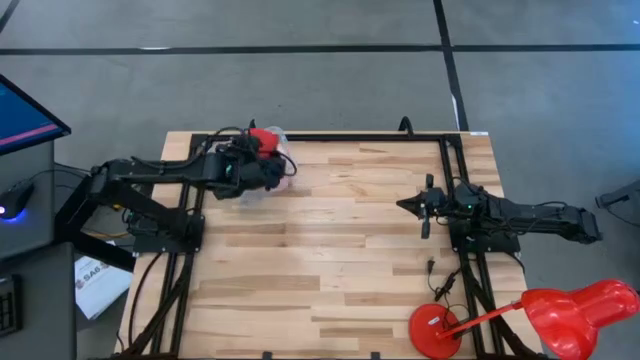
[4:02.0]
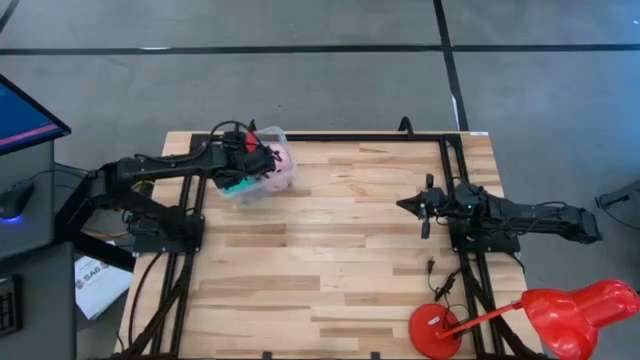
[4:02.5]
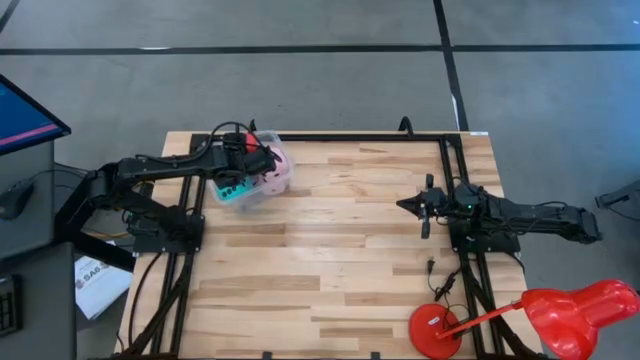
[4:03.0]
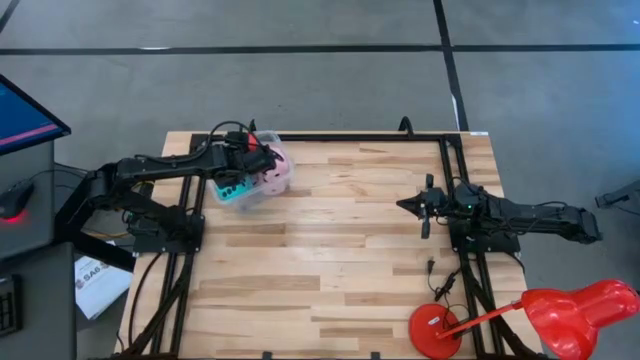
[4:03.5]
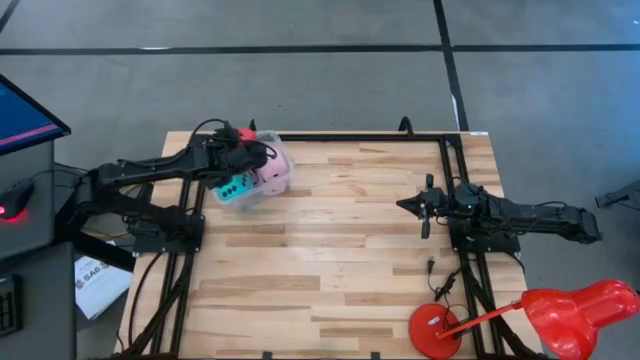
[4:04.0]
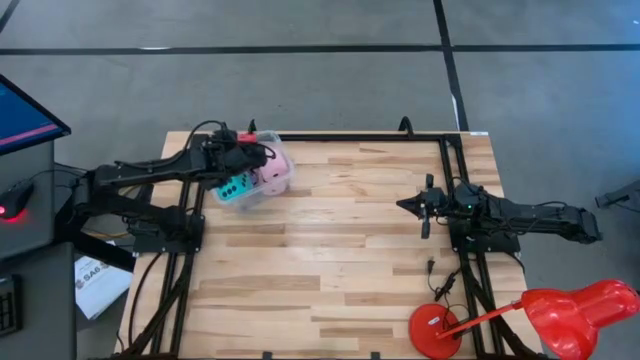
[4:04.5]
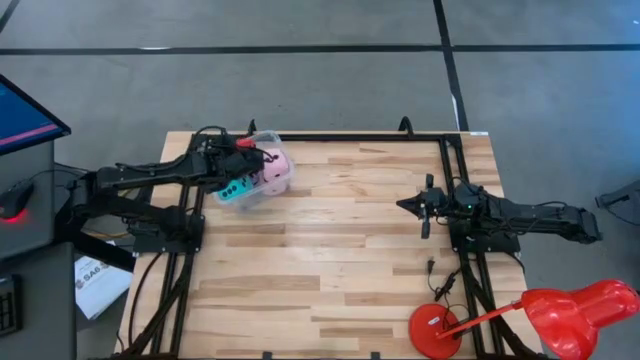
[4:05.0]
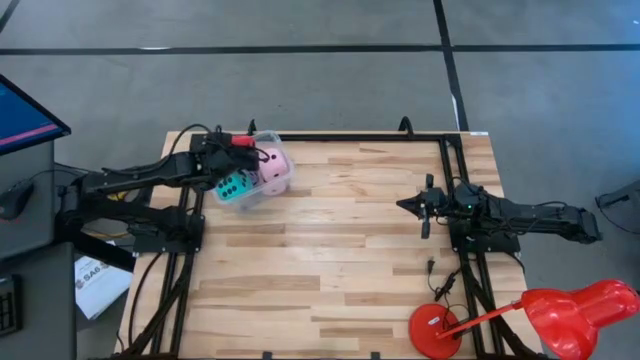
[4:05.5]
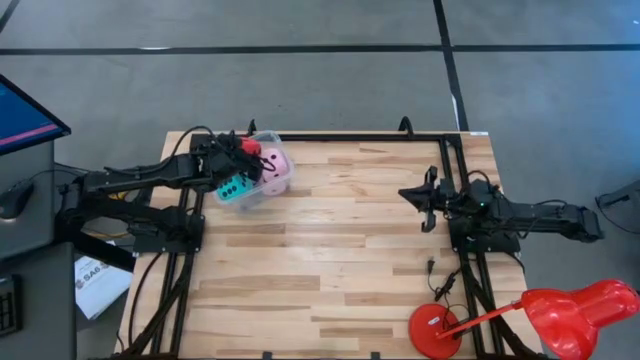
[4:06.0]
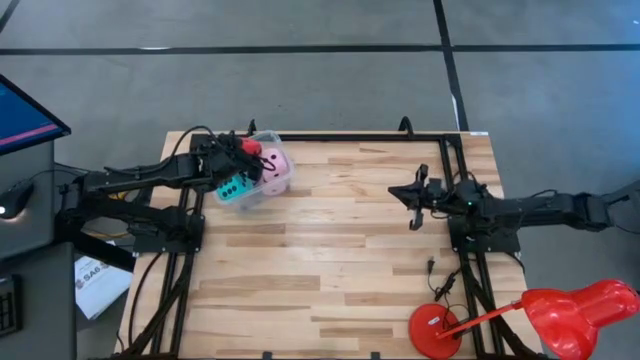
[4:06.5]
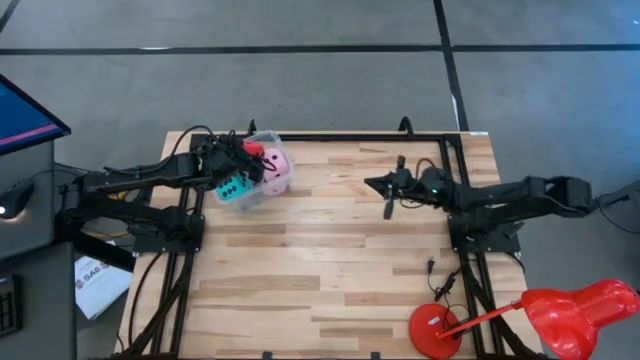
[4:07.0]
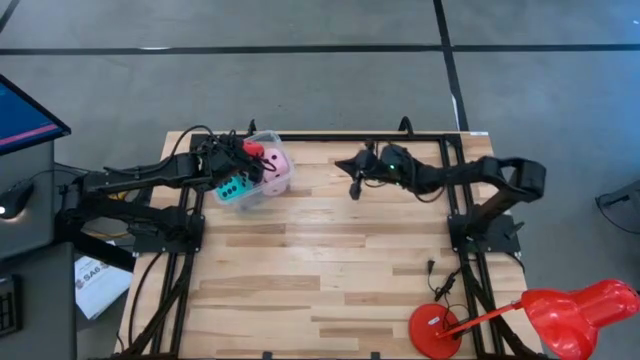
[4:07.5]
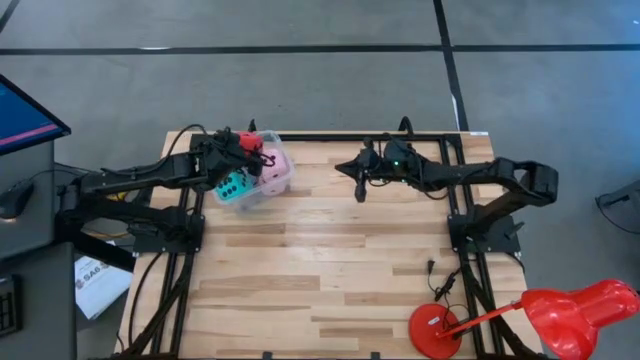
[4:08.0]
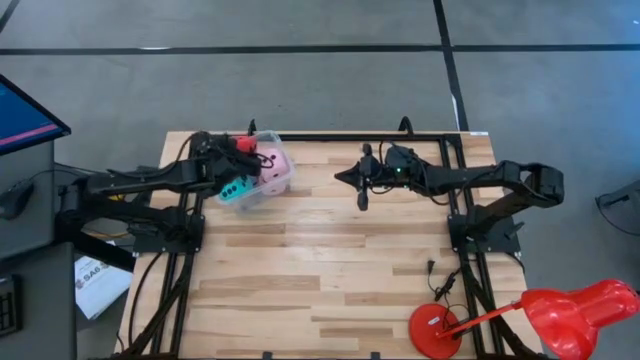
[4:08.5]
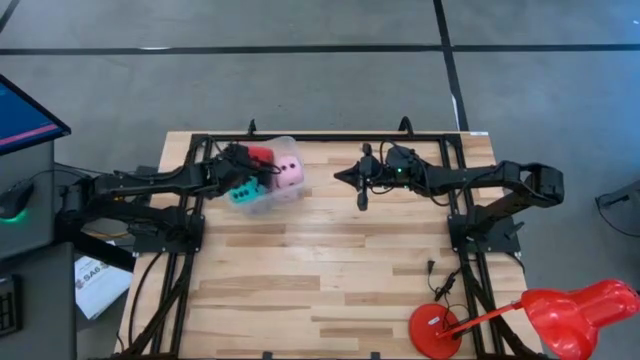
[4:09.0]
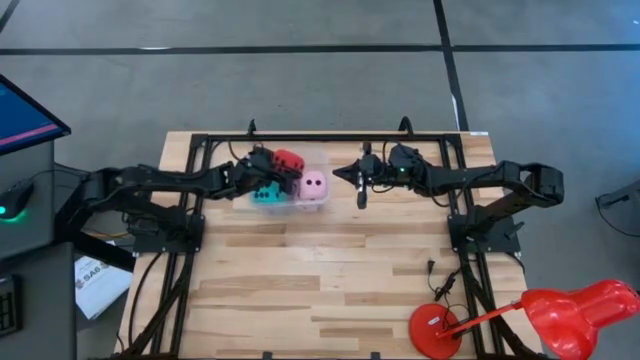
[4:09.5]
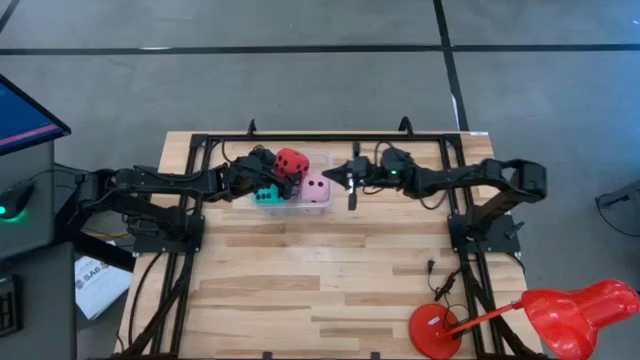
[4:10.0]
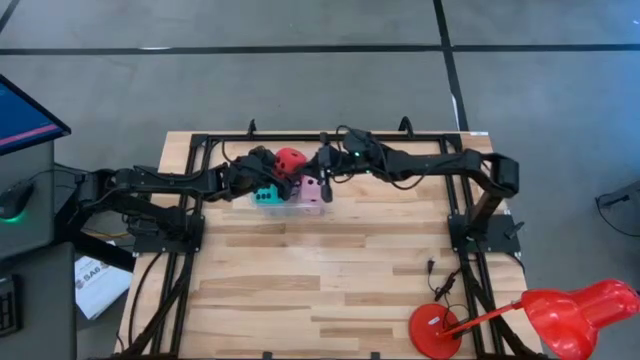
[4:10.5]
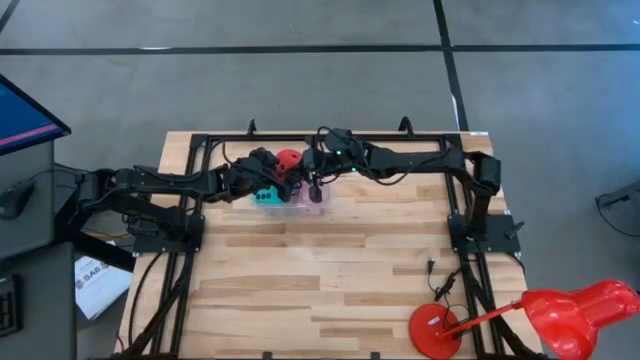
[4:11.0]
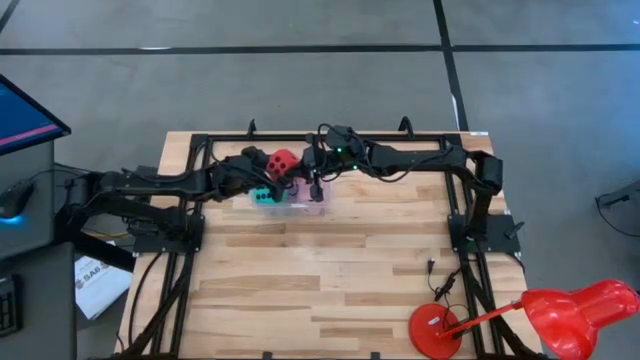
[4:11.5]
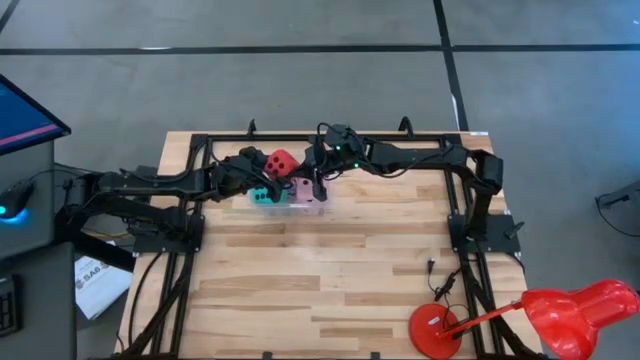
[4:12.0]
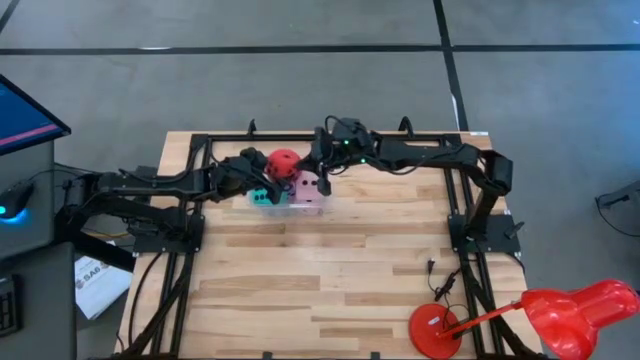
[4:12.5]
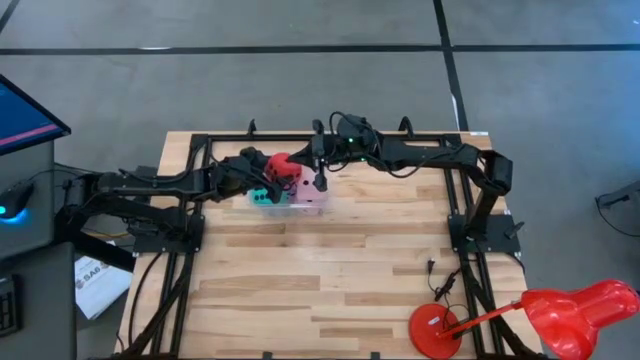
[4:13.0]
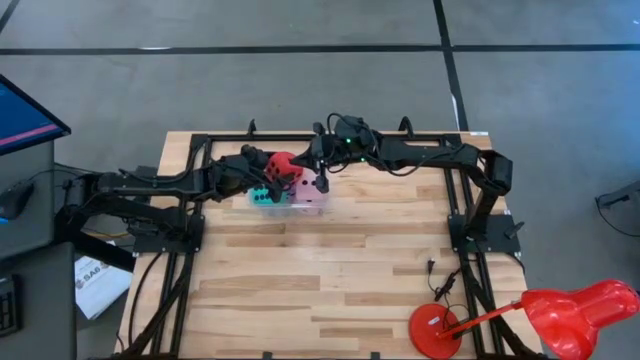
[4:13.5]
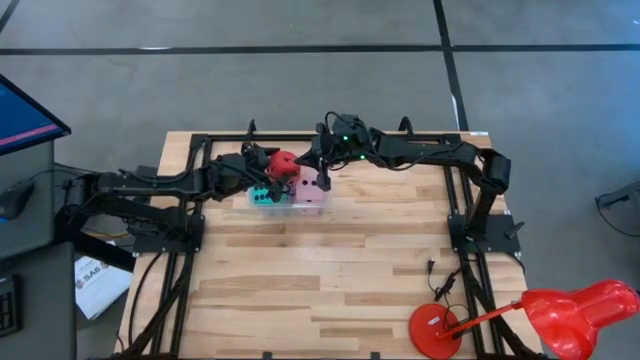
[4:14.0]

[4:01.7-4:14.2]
Task: Pick & Place Dice
Put the large red dice into the transparent container

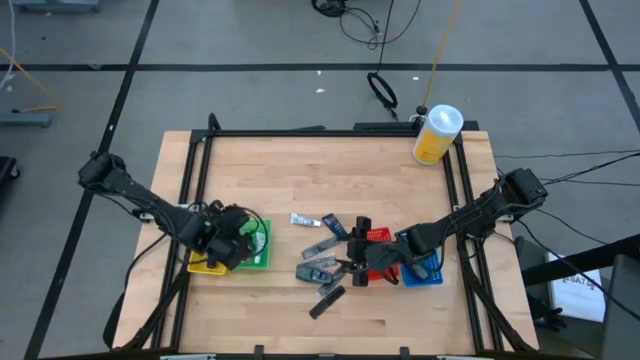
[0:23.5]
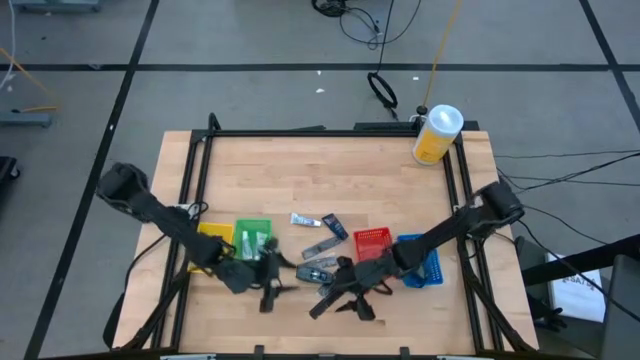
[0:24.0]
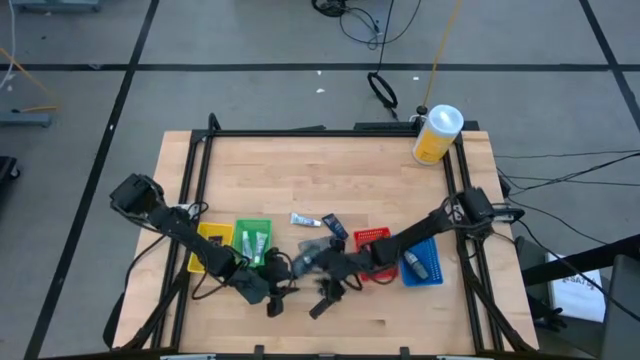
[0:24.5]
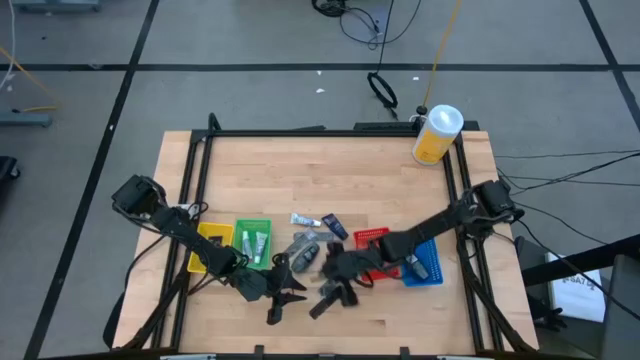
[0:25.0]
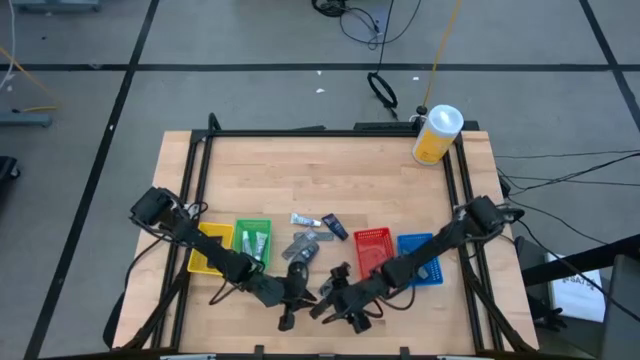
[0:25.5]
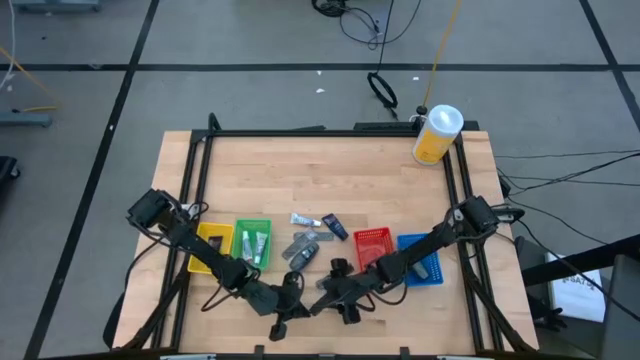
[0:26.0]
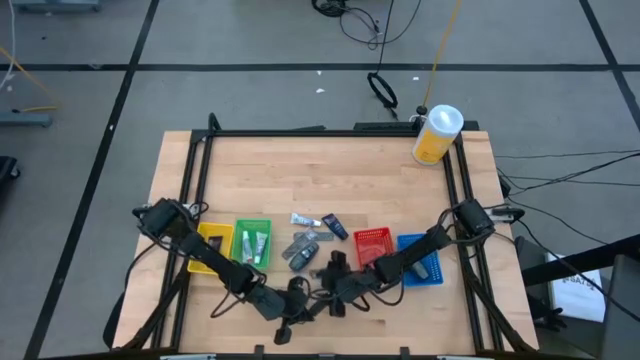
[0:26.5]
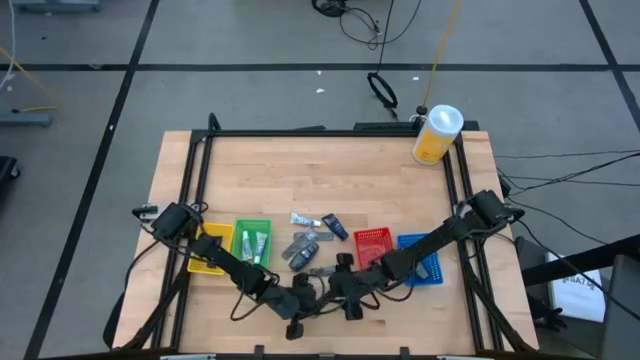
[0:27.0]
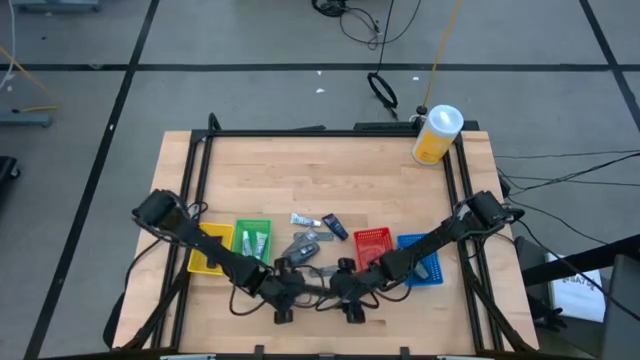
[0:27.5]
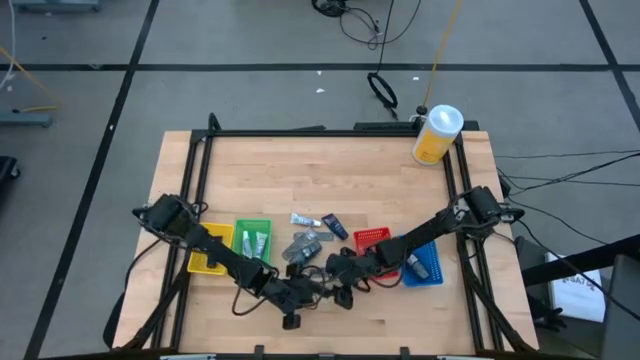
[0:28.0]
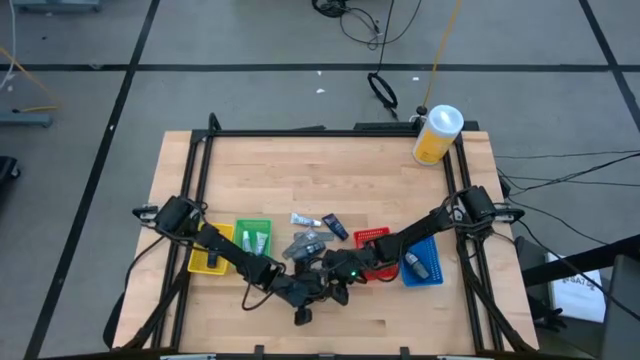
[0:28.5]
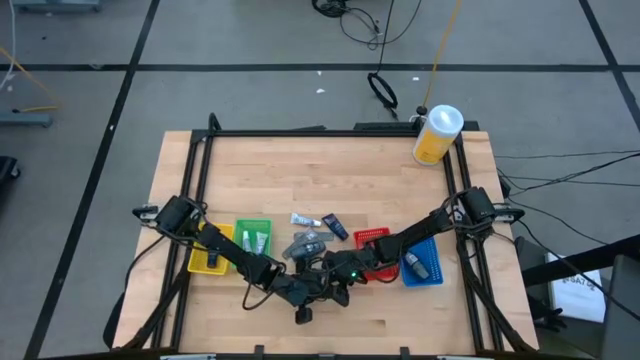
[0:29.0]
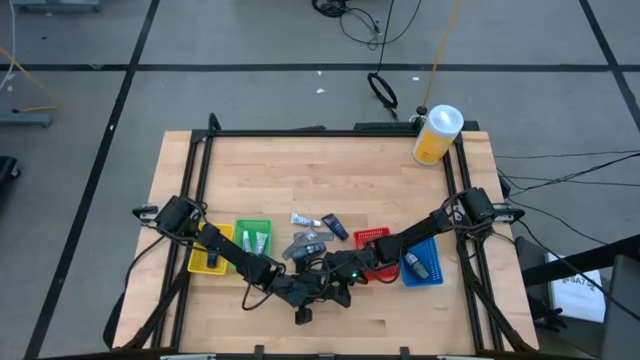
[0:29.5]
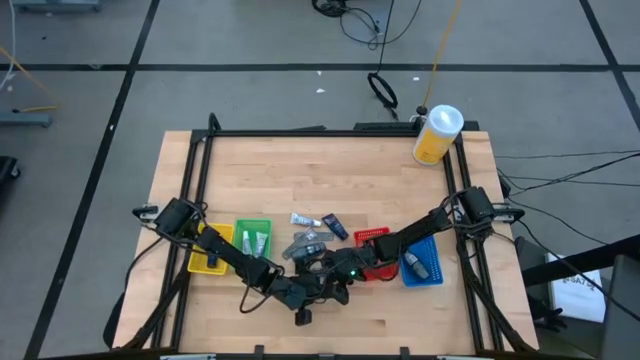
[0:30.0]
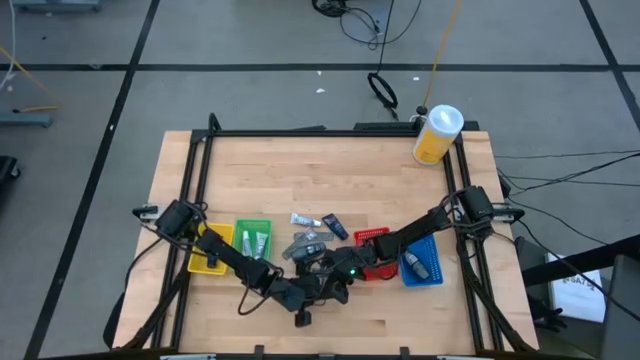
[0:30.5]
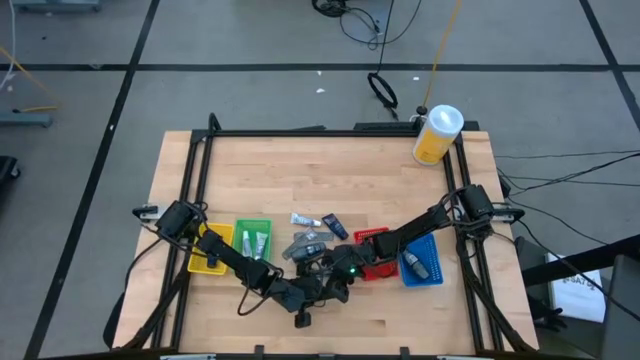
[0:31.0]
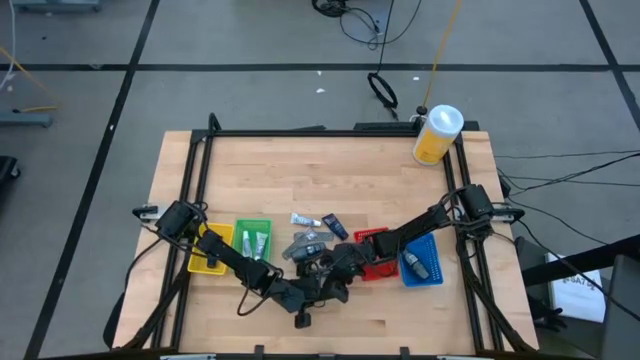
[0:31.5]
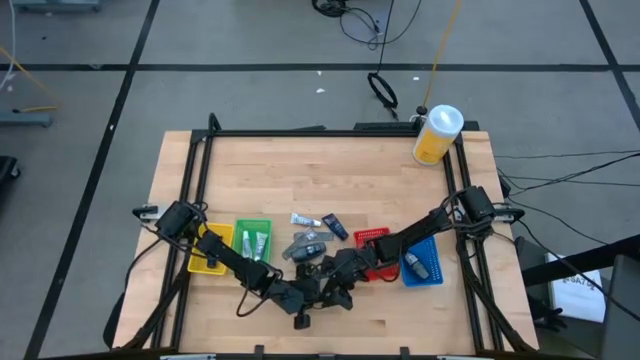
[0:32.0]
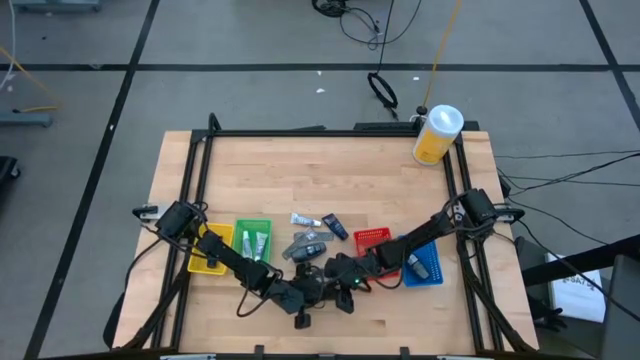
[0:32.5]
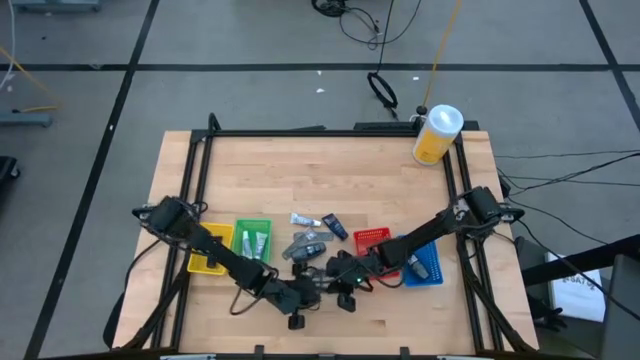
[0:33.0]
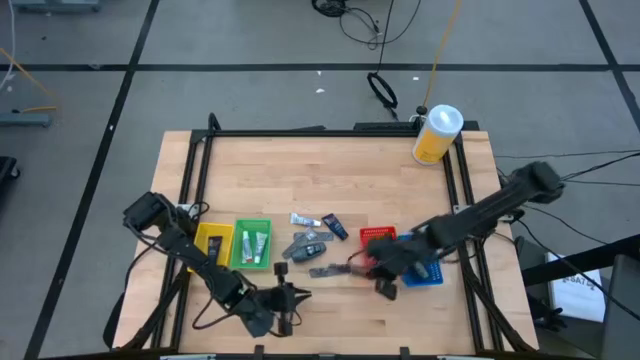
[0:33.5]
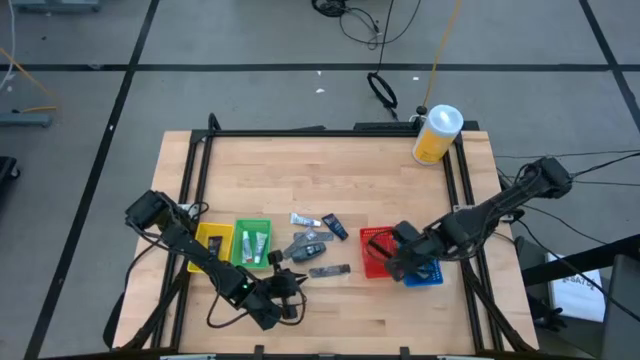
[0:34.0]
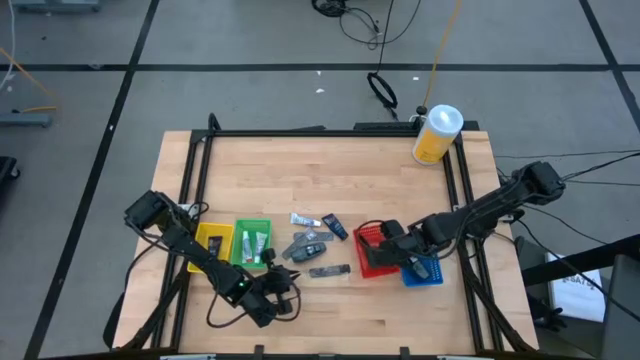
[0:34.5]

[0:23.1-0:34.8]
Task: Pick & Place Travel size toiletries
Put the black comb into the red bin
